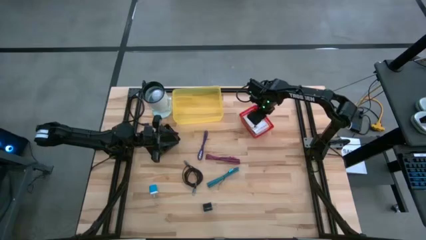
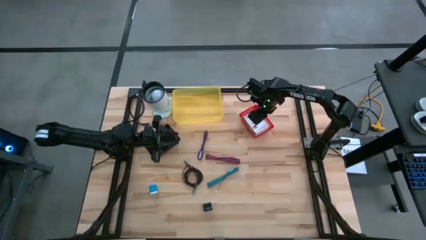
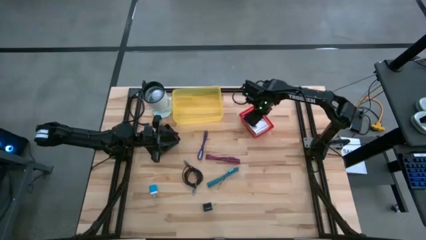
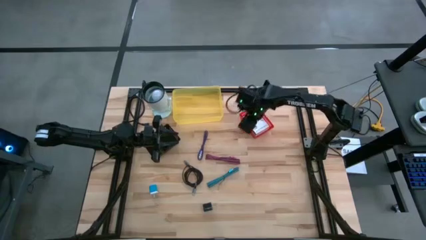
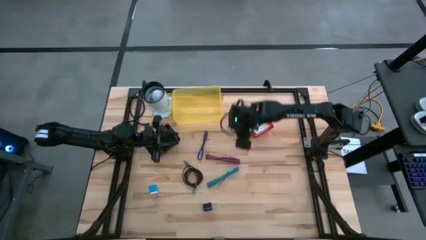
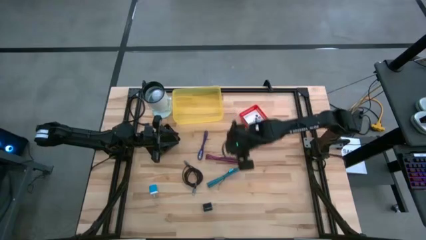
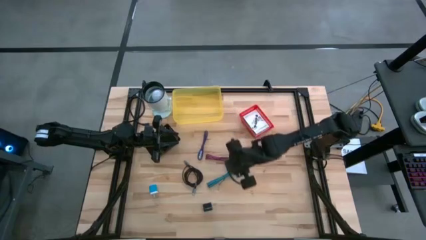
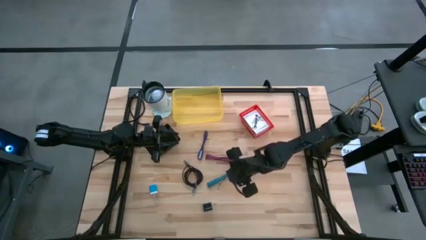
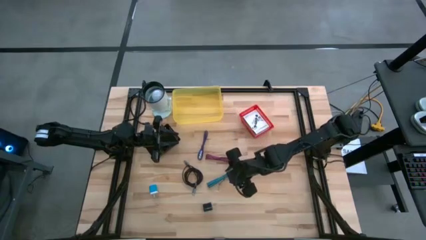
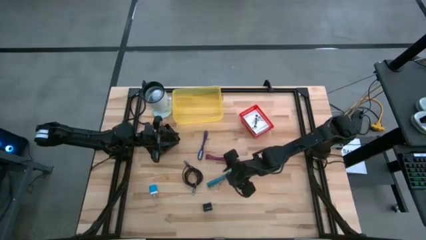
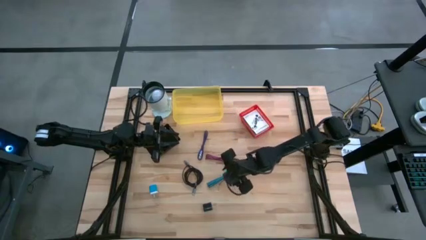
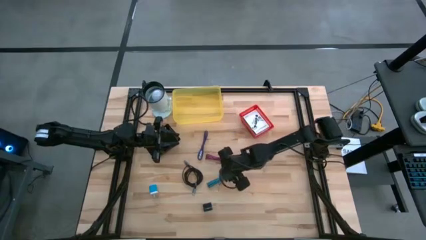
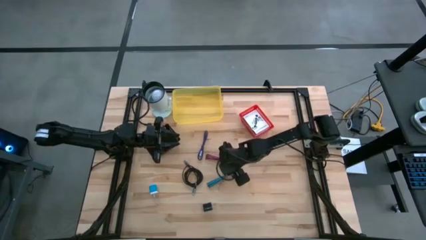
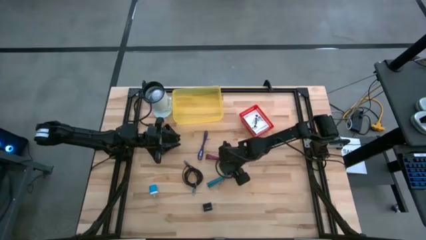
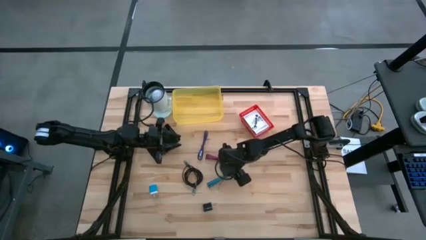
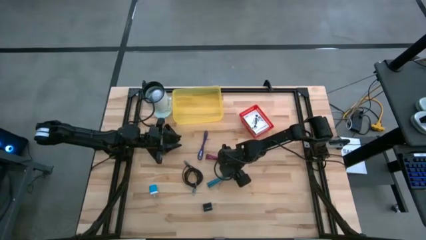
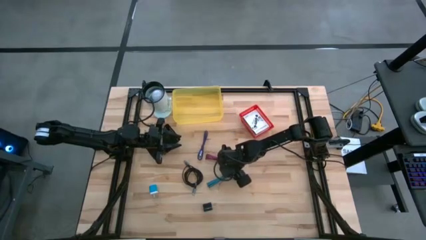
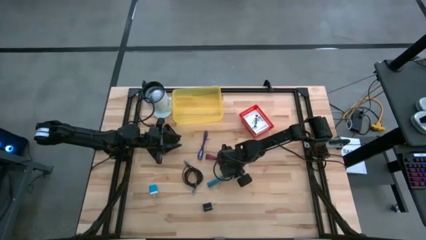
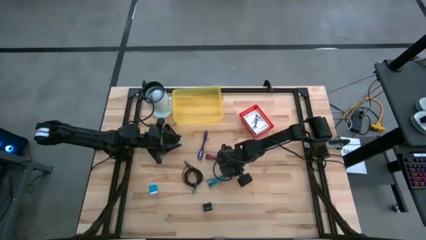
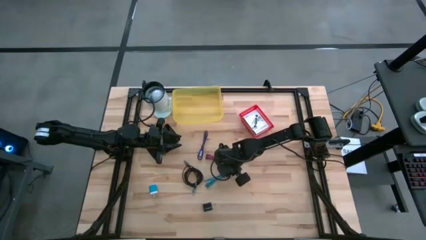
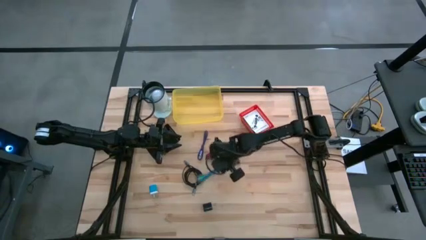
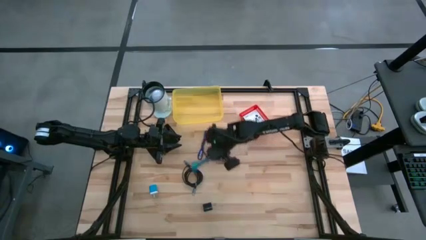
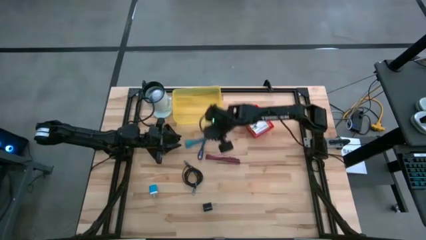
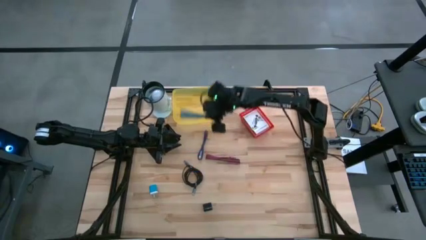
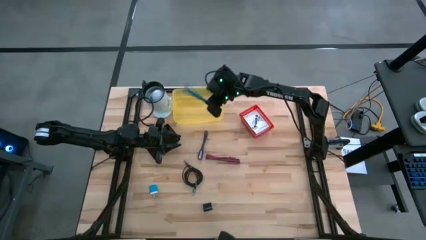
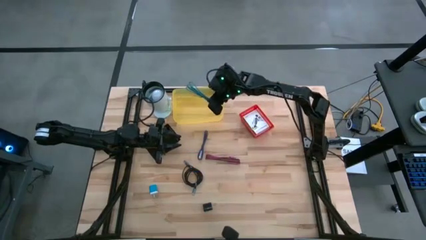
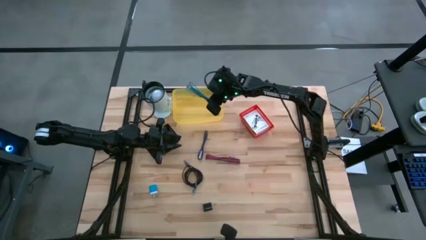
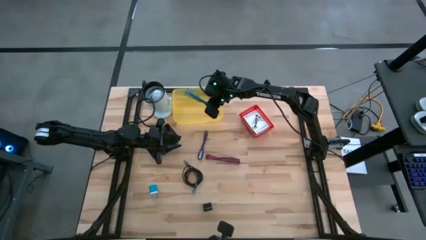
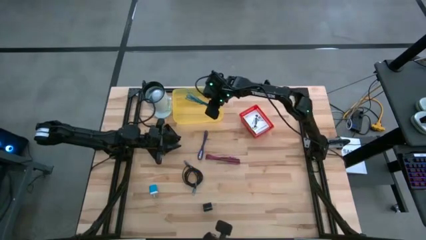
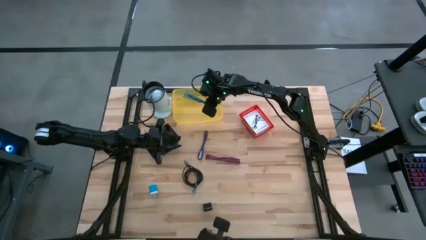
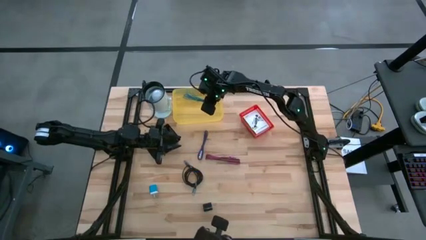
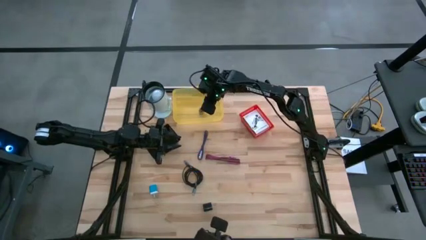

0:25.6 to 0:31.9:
Task: Pick and place items into bin
Put the blue charger cable into the yellow bin

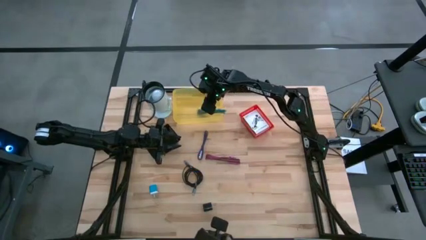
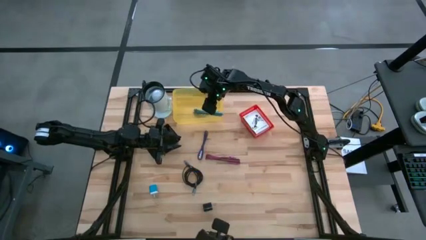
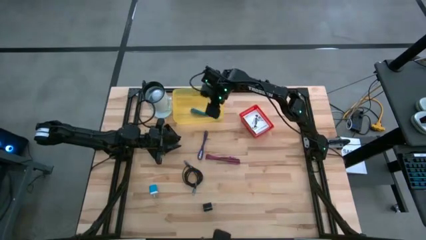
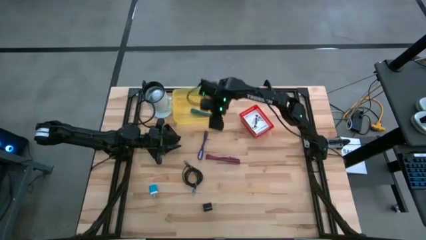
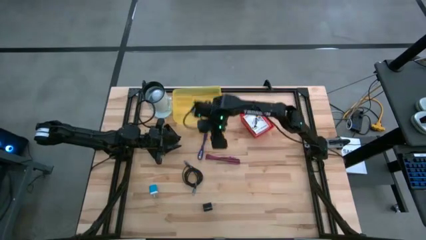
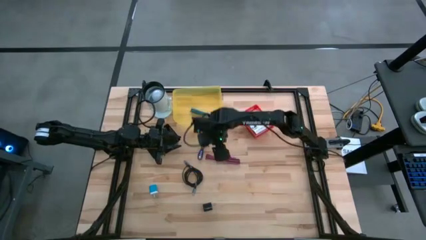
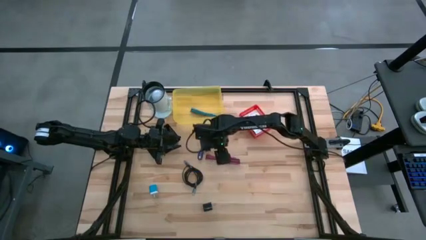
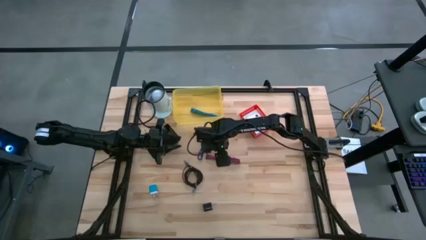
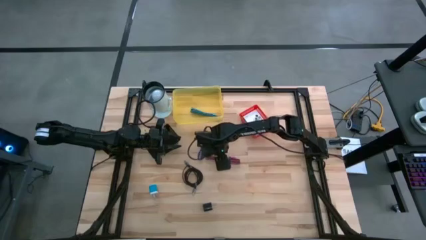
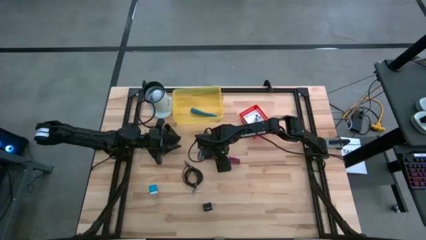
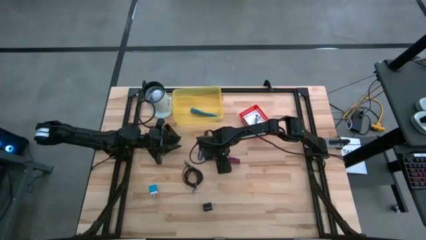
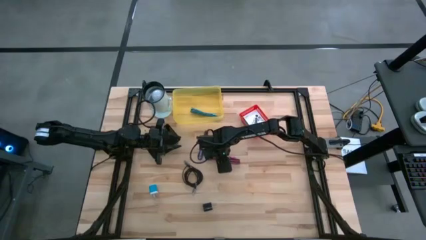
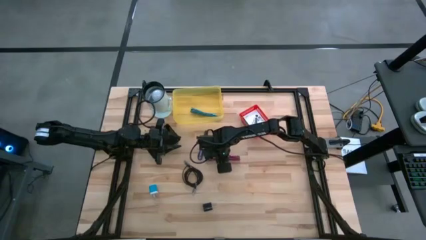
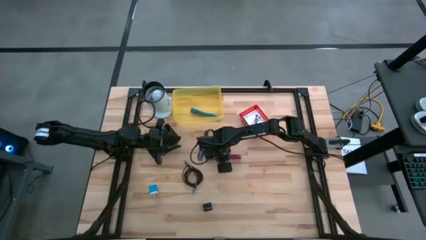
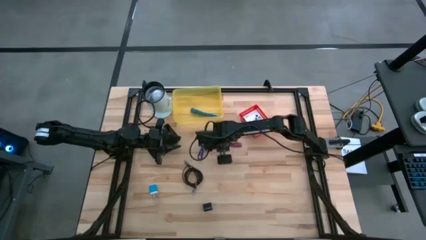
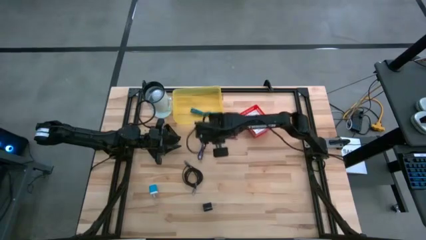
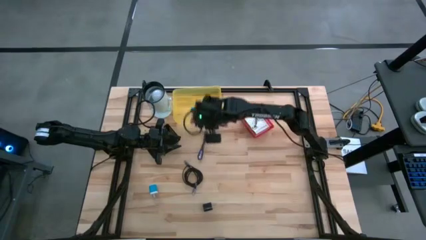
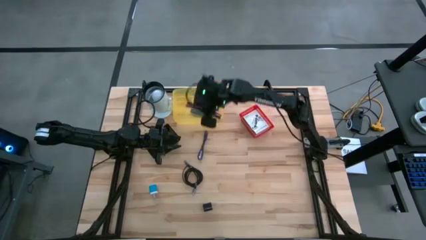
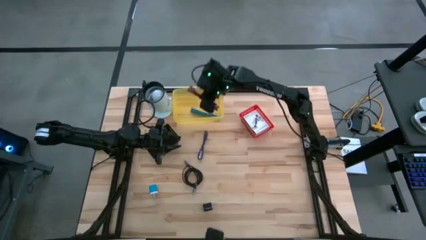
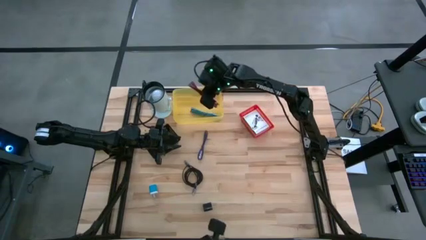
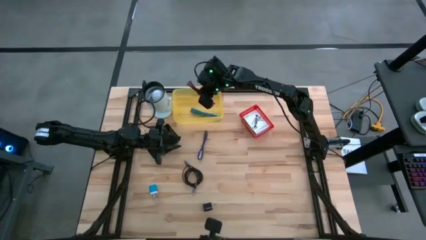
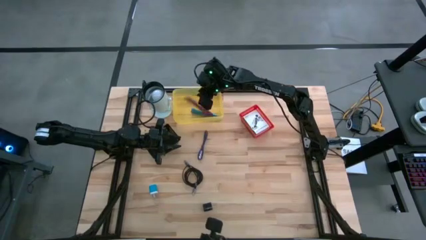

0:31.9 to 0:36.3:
Put the pink charger cable into the yellow bin

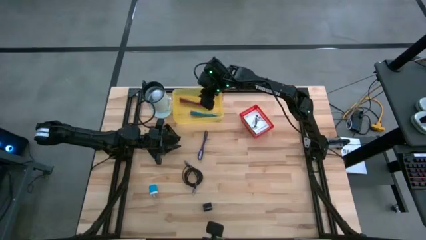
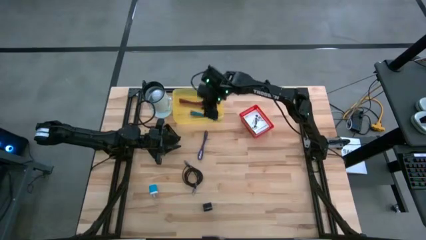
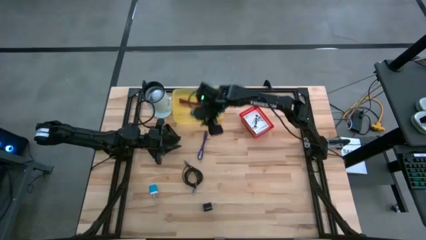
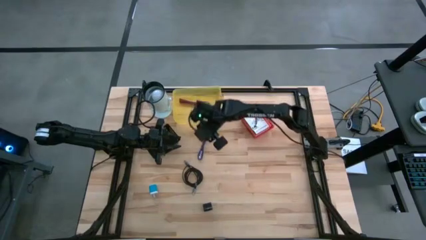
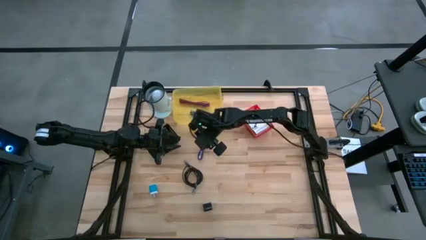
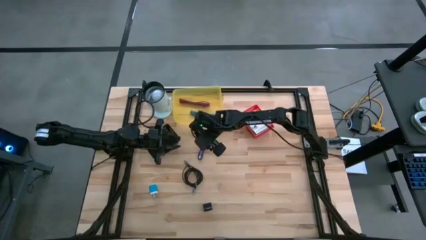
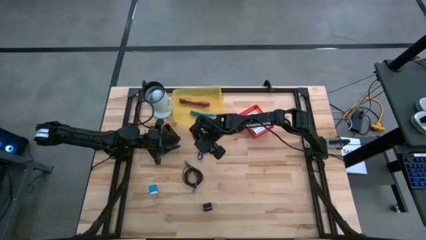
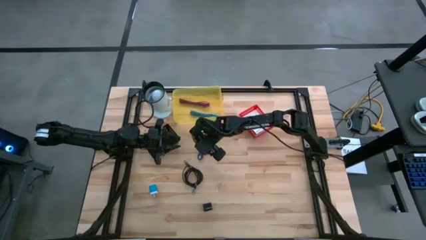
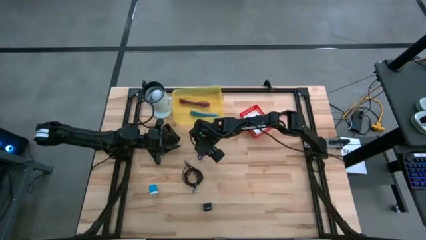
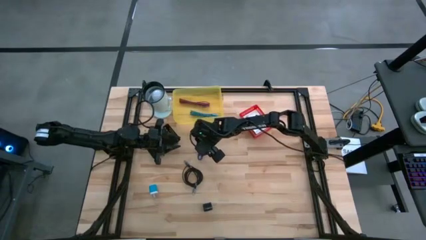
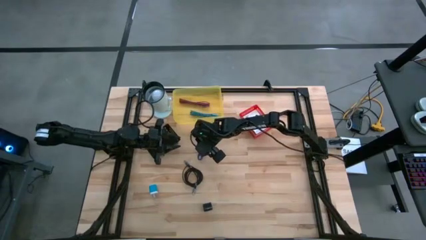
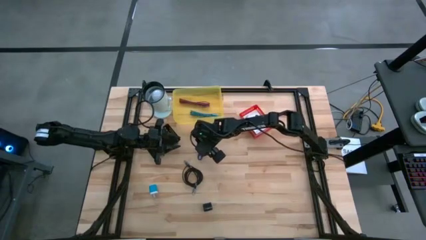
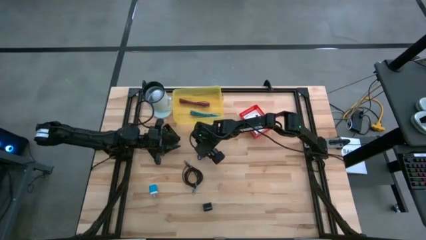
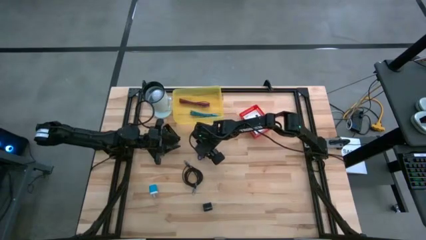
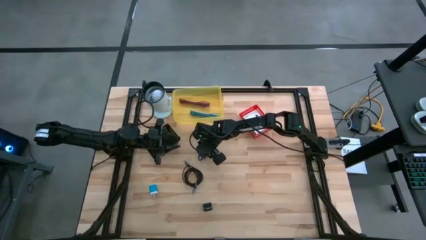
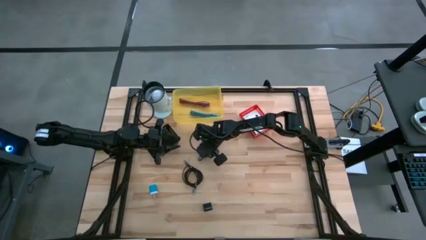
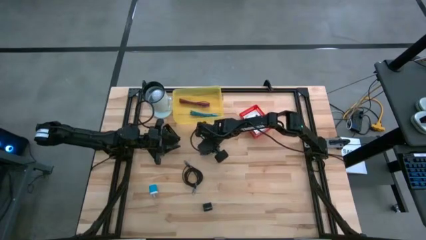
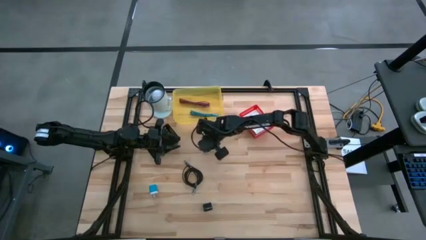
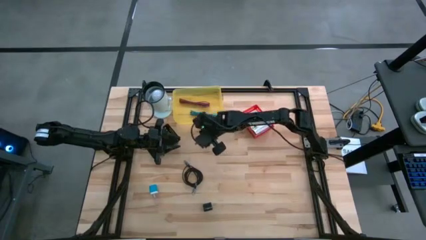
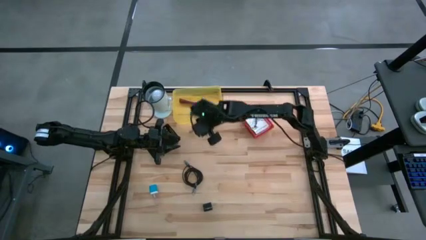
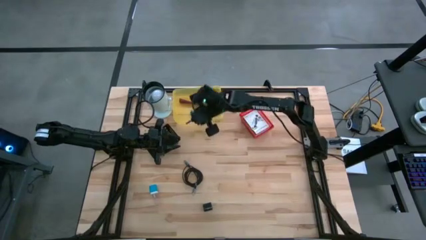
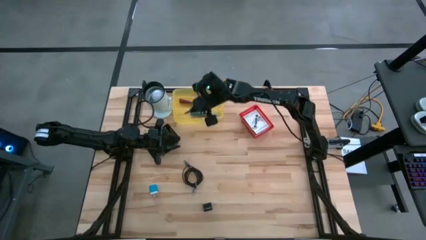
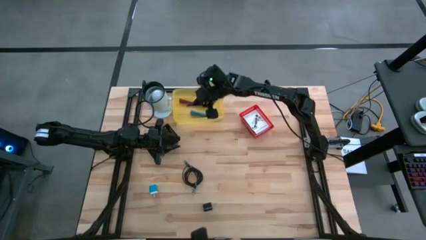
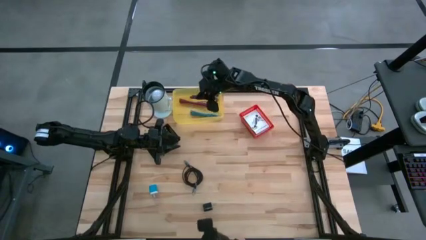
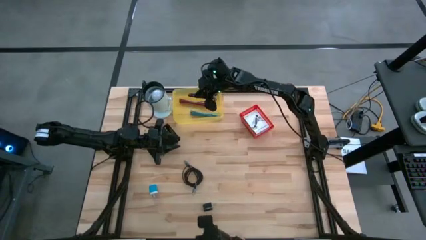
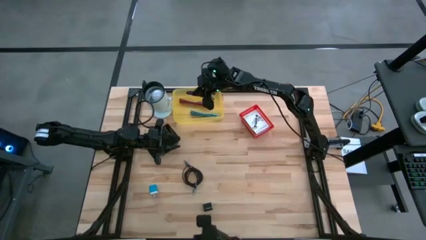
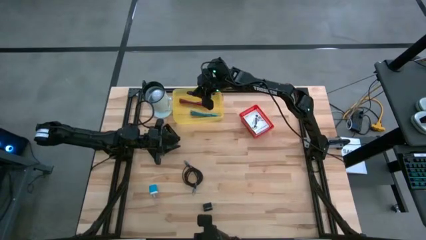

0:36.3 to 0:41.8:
Put the purple charger cable into the yellow bin

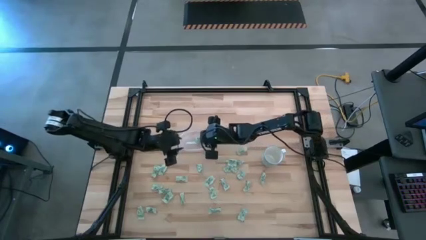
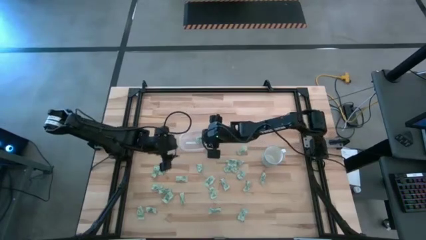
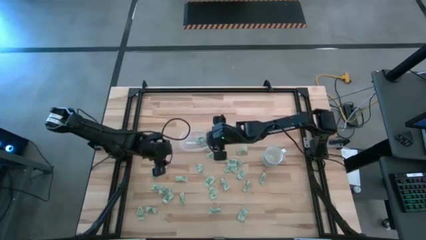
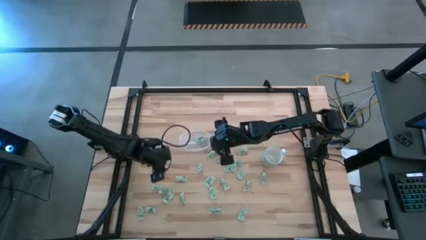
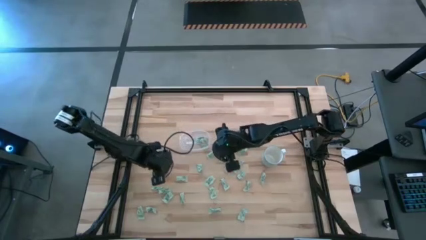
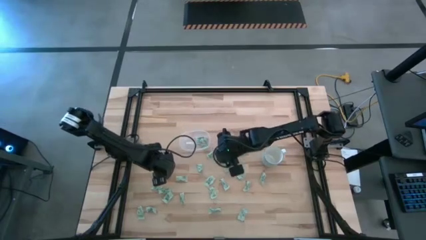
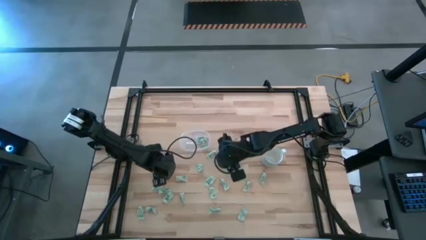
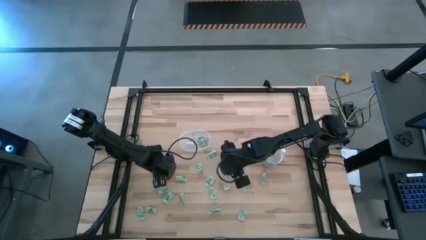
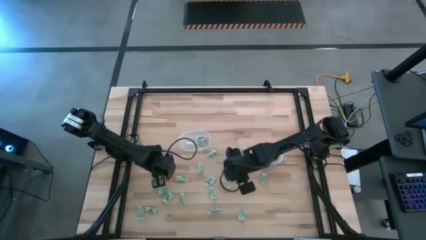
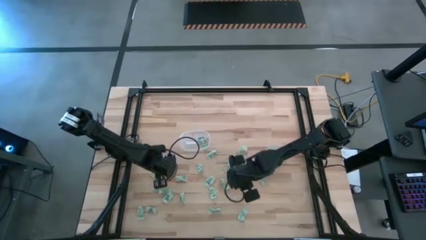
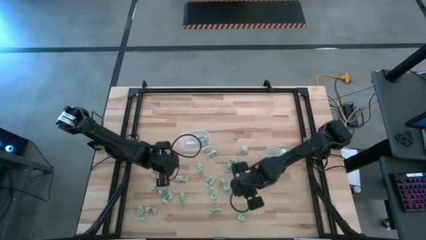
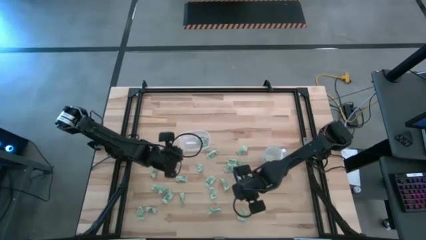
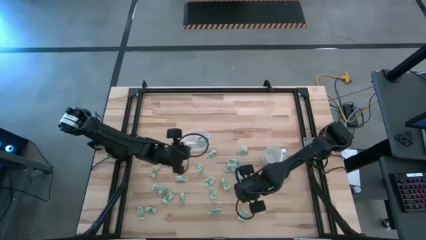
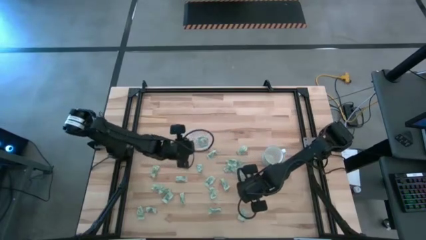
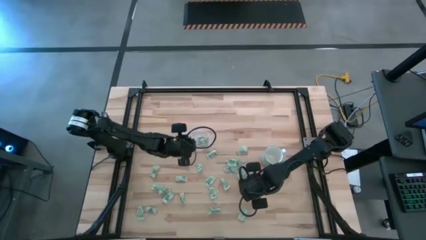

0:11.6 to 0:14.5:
Task: Pick and place Stevia / Truvia into bins
Put the stevia packet into the transparent bin
